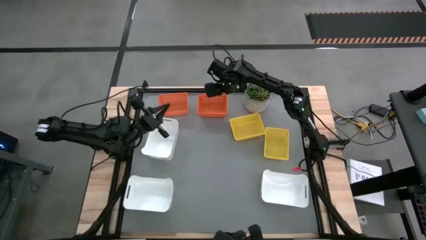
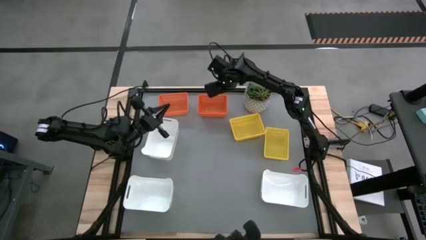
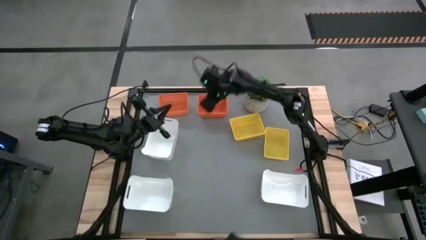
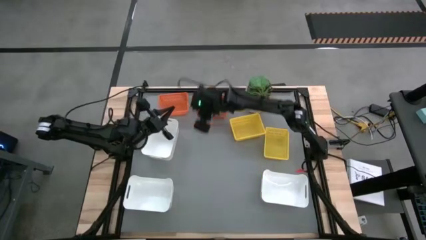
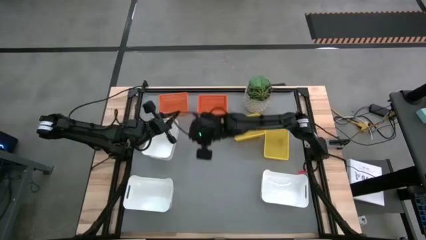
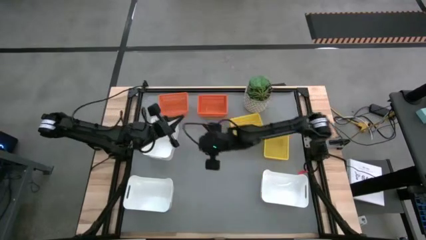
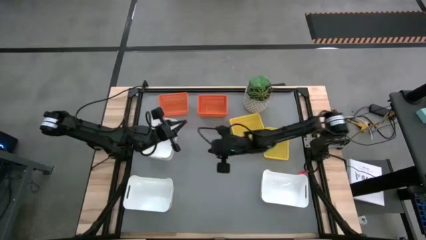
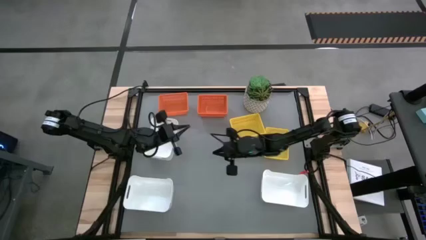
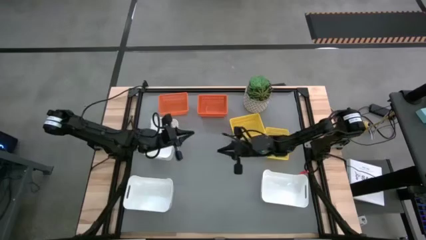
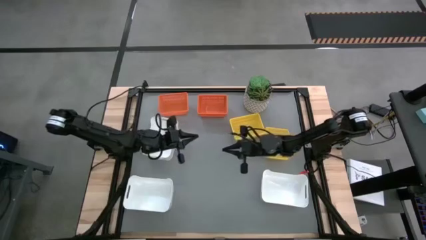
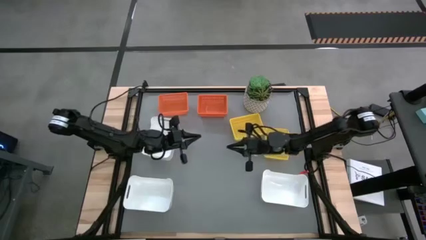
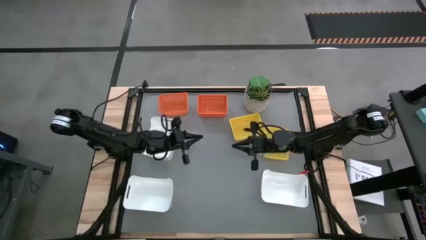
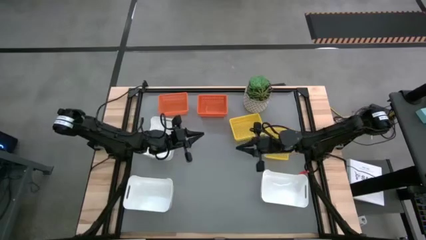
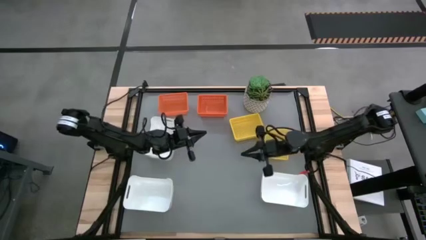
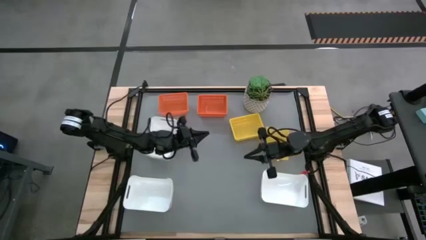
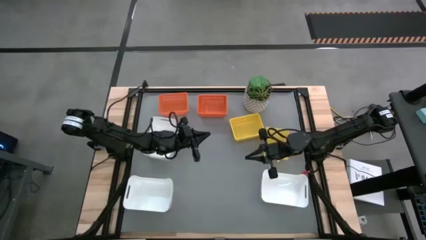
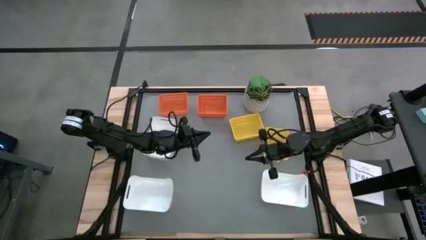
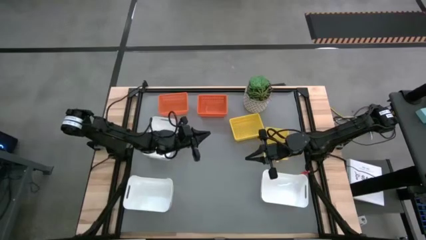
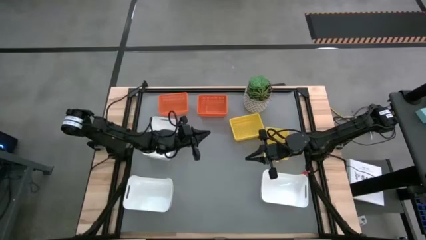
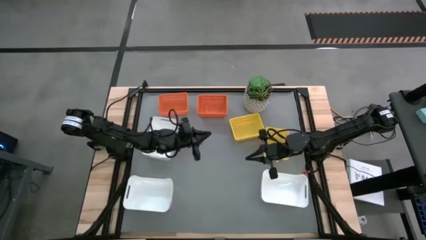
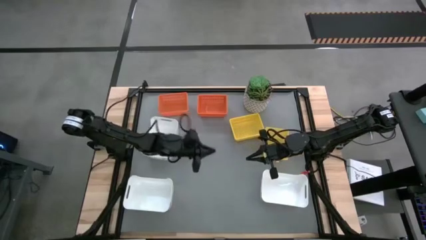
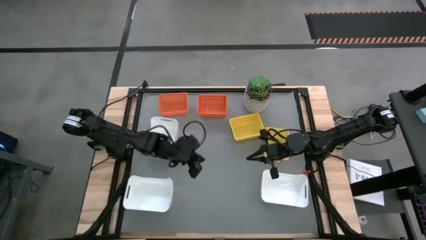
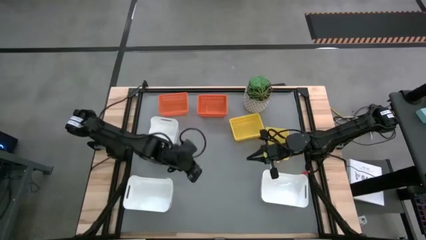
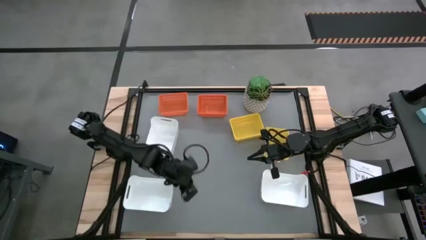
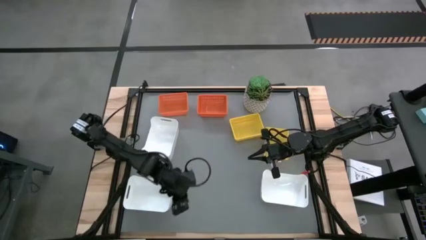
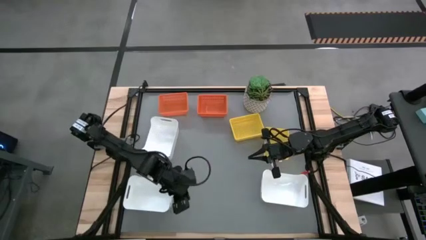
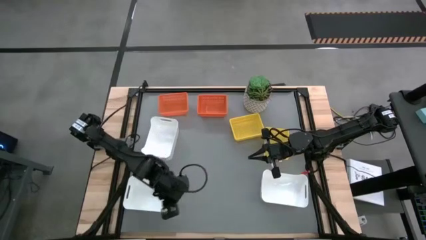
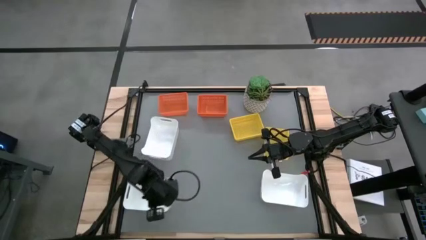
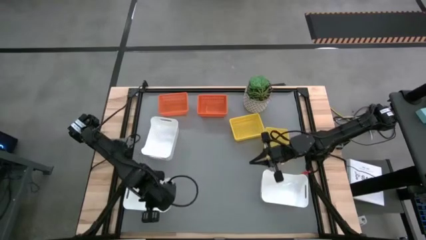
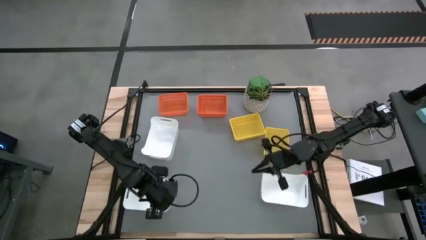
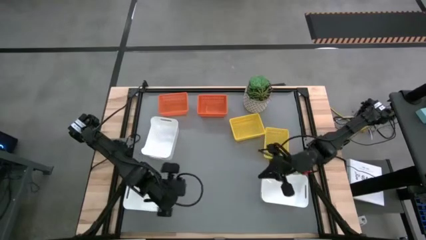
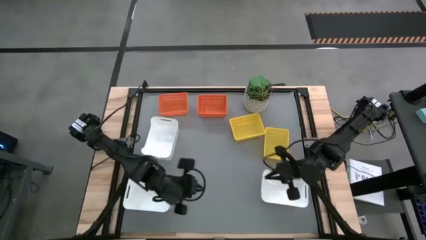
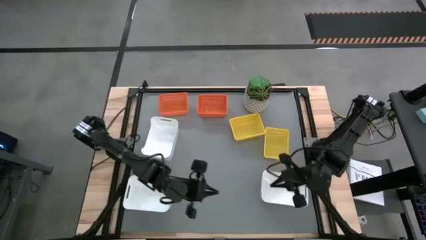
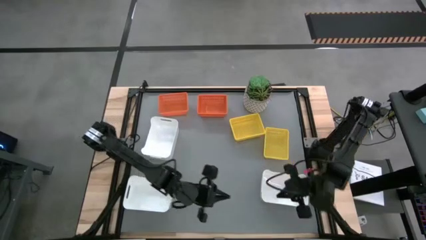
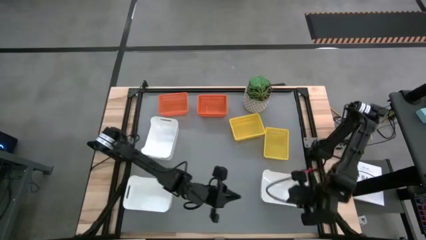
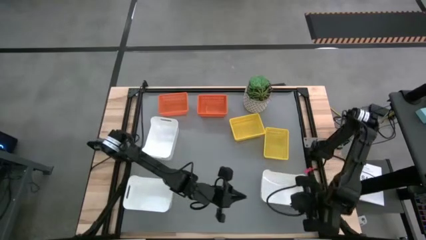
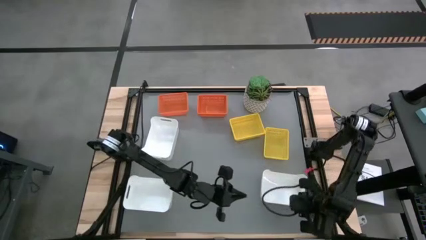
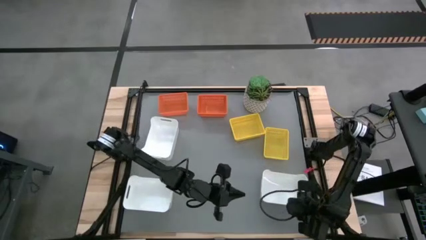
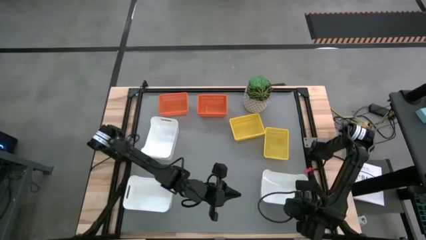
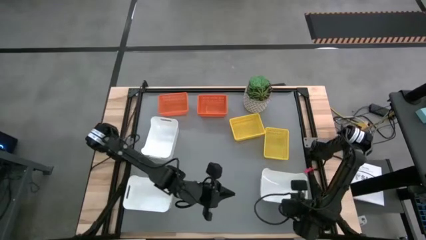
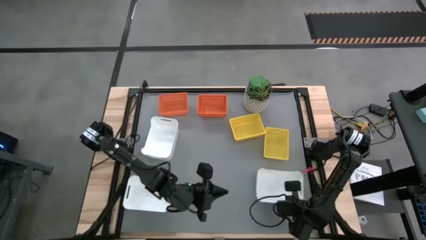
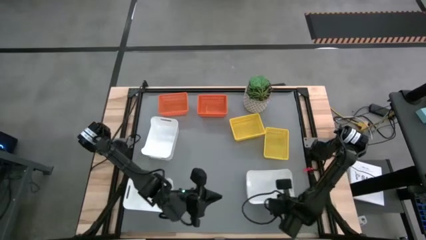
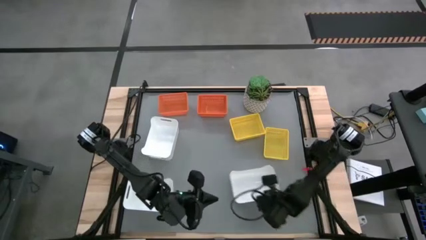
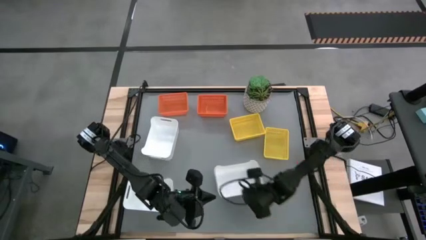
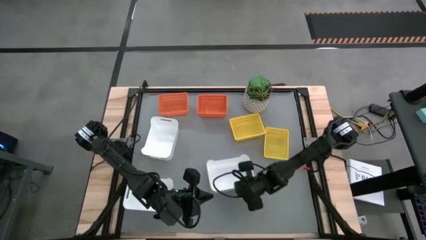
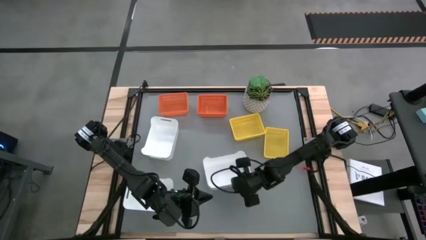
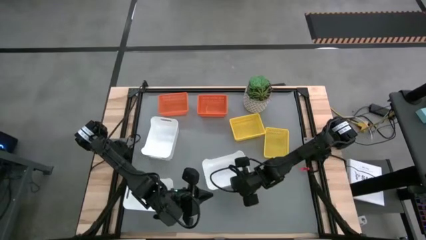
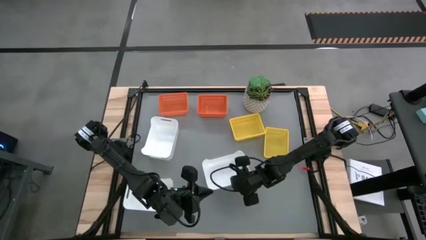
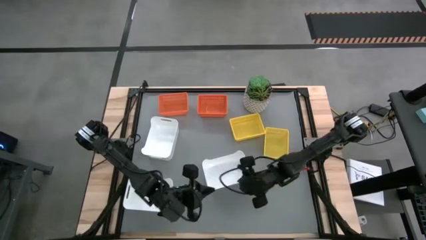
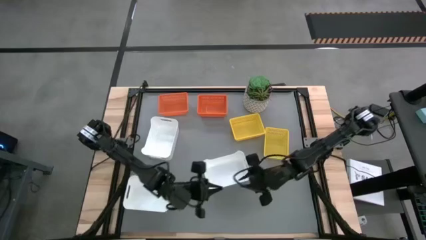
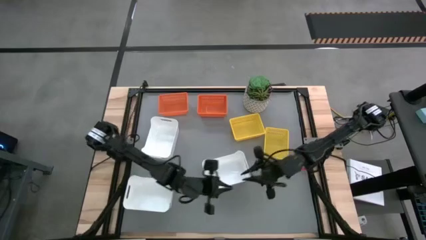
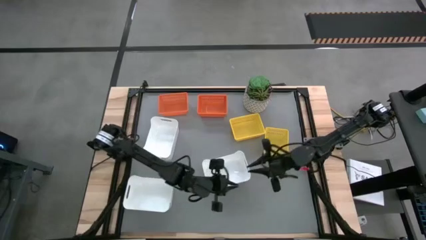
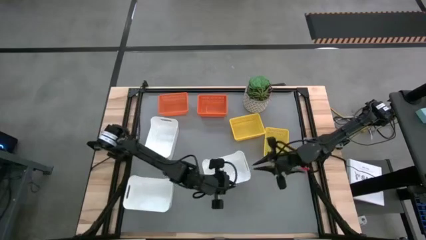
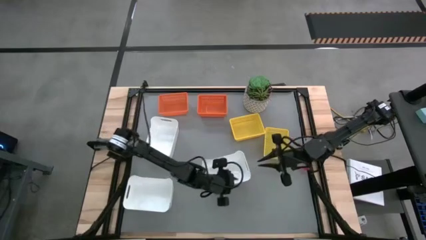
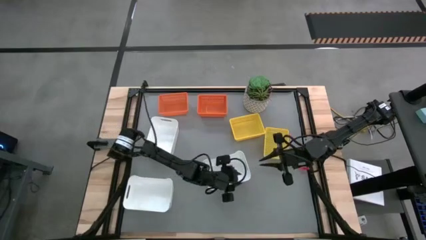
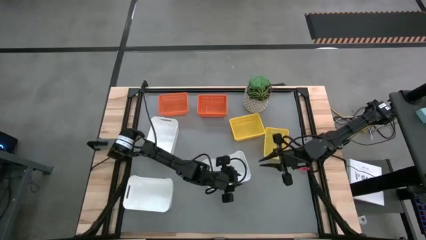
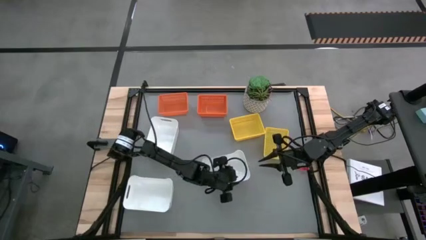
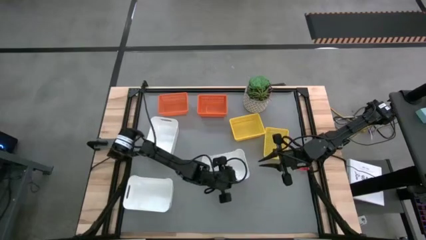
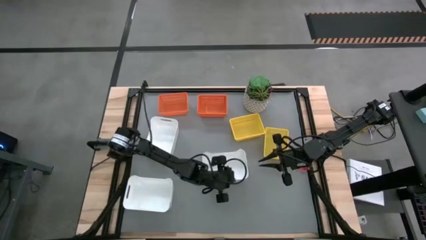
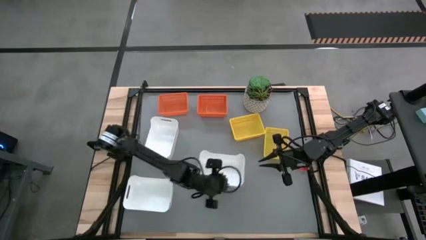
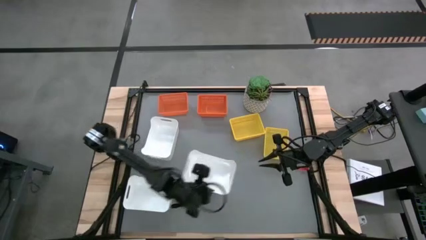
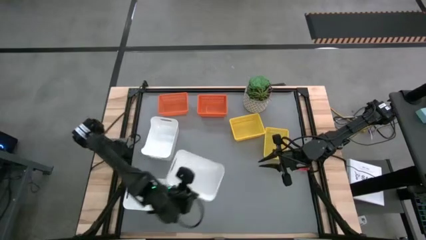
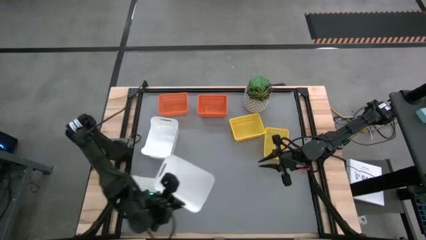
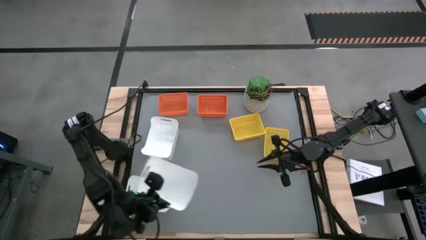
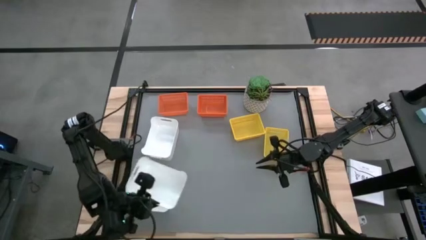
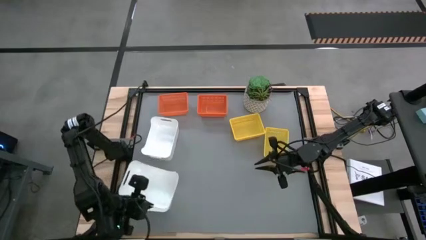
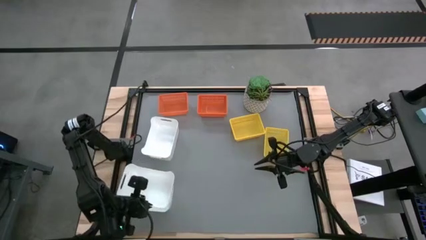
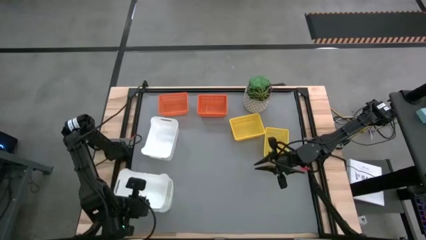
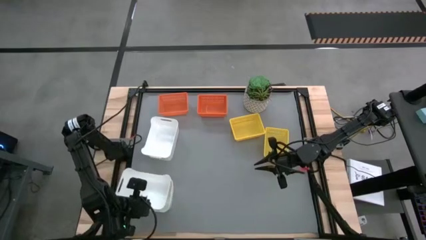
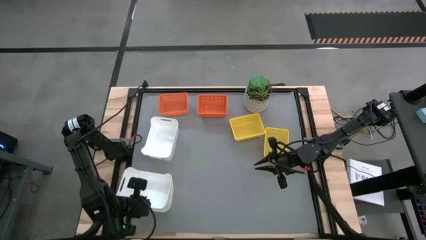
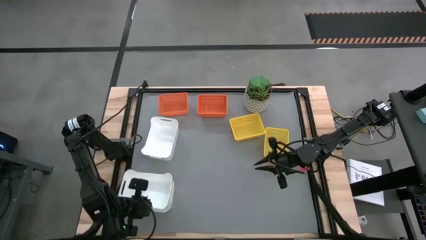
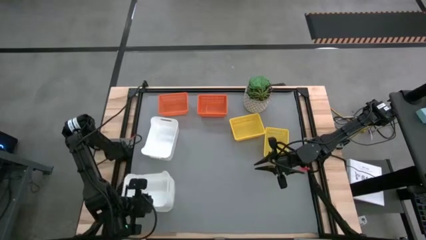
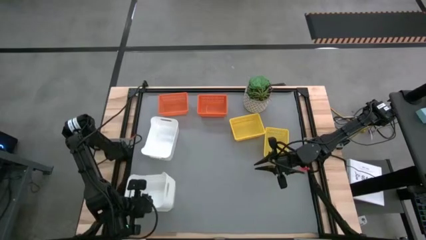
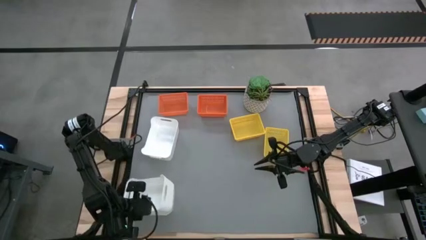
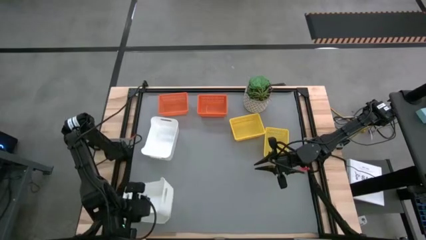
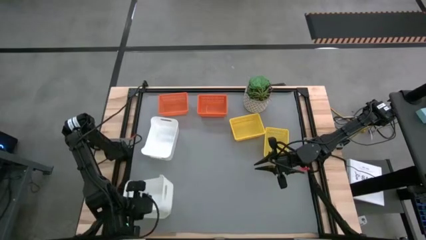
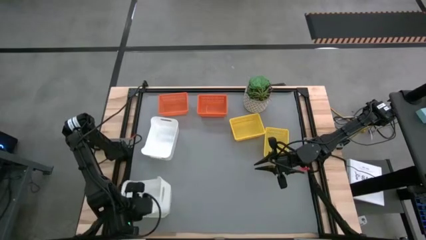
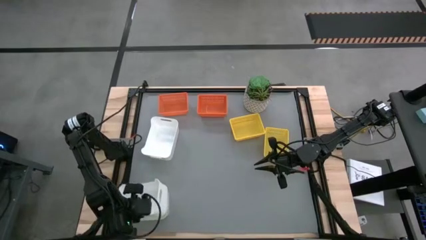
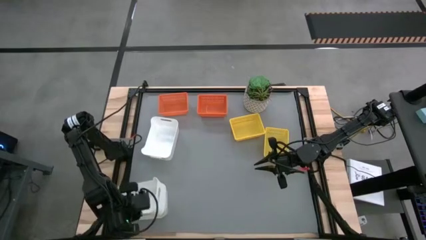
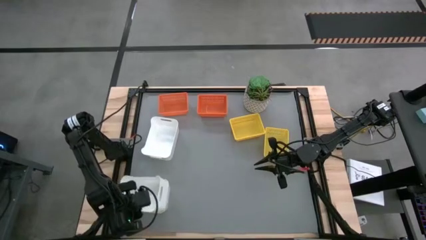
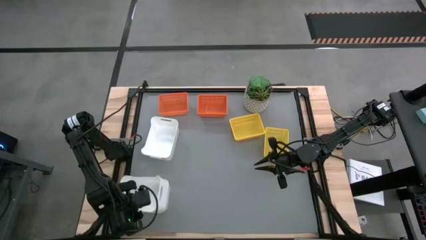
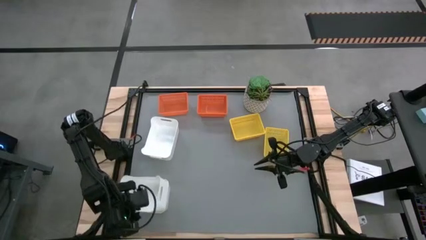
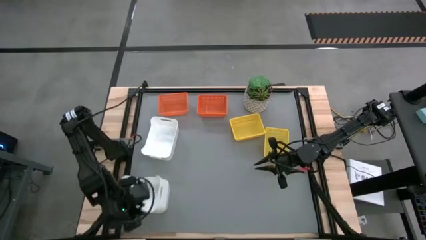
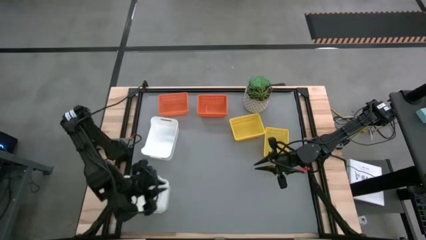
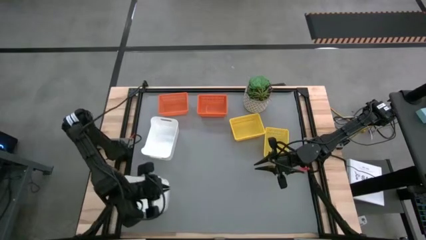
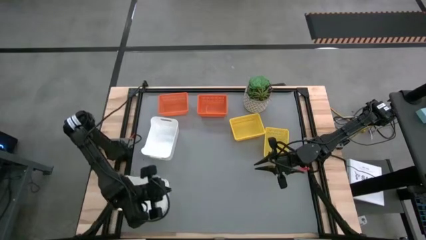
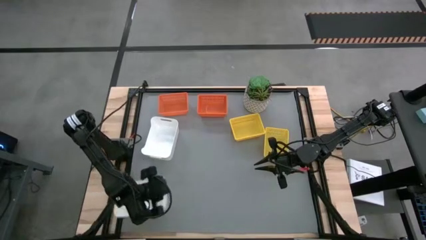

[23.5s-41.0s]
Stack the bottom right white bin on top of the bottom left white bin
